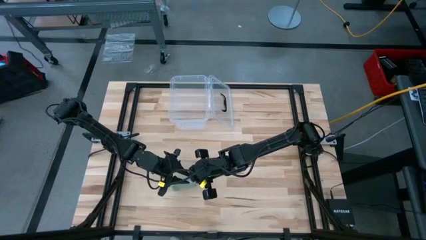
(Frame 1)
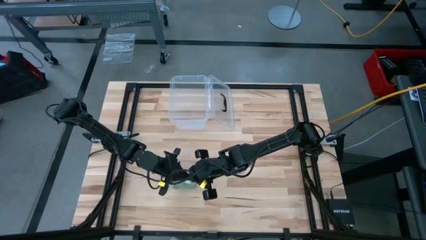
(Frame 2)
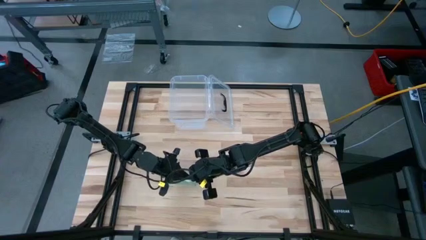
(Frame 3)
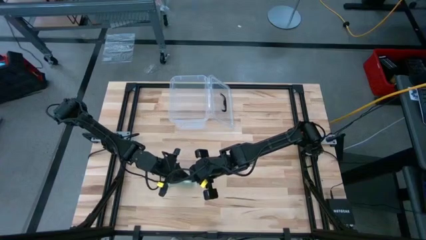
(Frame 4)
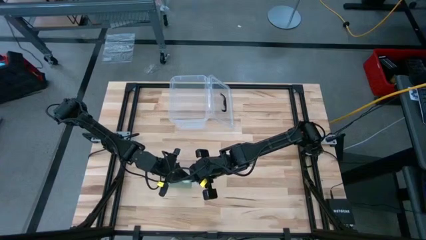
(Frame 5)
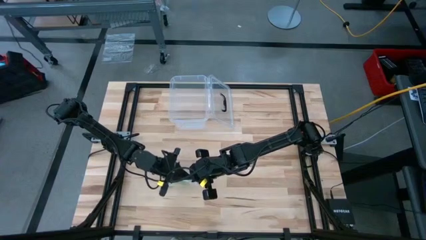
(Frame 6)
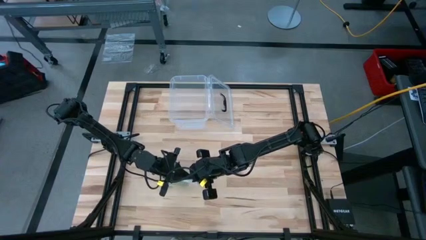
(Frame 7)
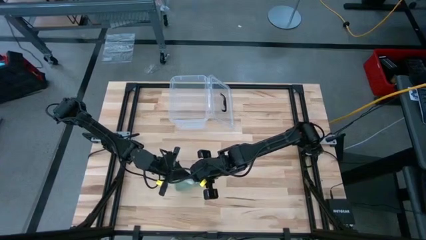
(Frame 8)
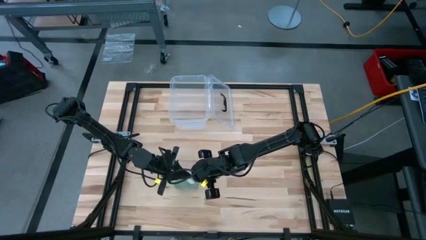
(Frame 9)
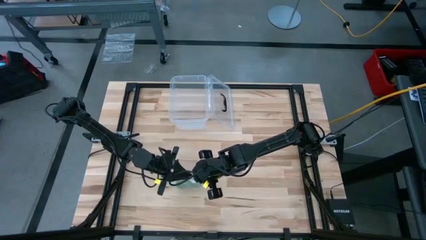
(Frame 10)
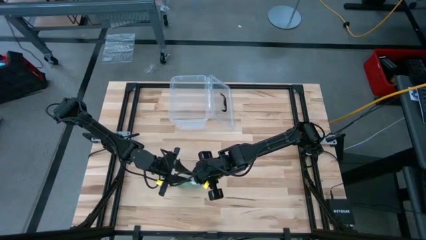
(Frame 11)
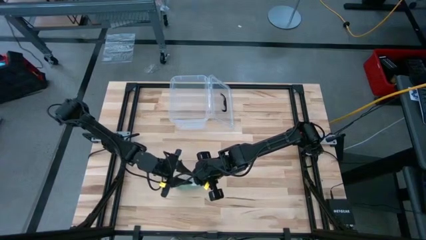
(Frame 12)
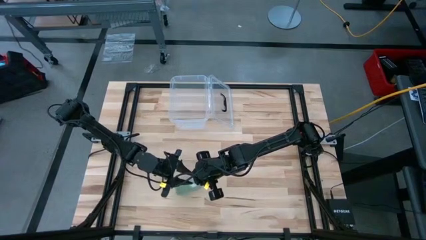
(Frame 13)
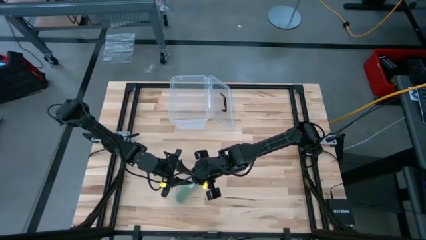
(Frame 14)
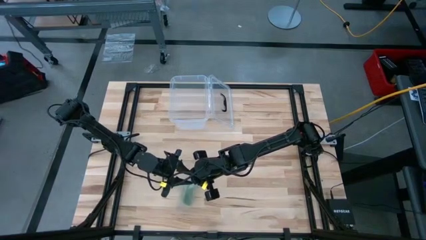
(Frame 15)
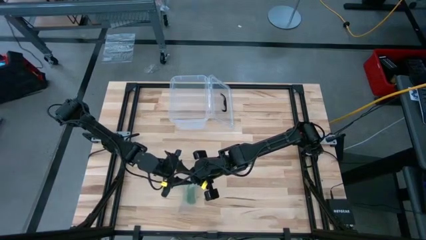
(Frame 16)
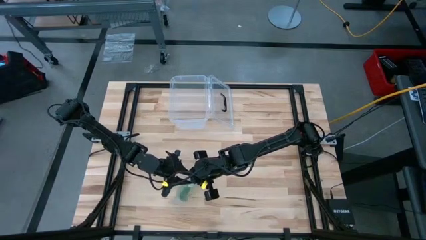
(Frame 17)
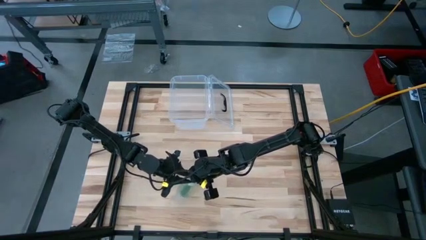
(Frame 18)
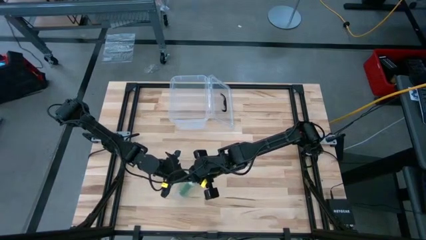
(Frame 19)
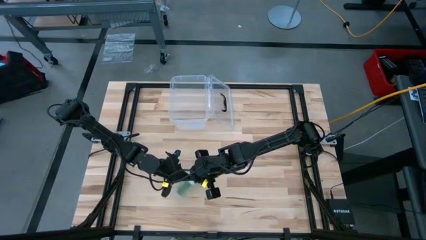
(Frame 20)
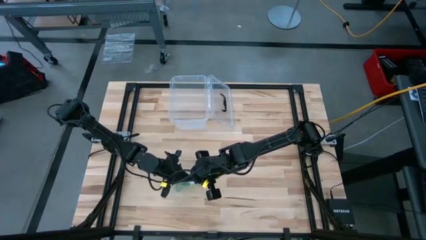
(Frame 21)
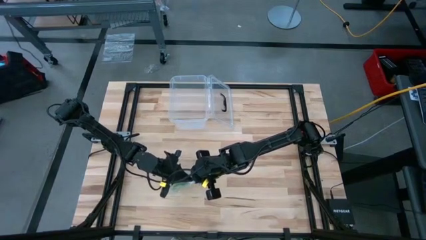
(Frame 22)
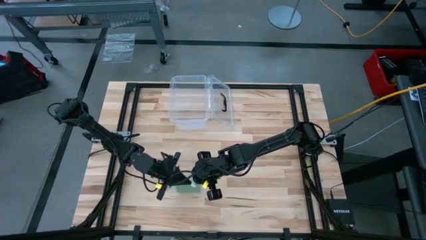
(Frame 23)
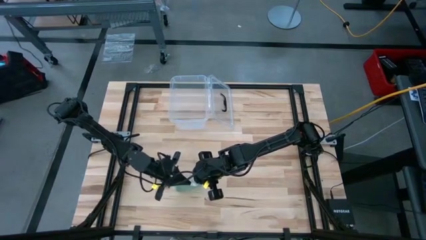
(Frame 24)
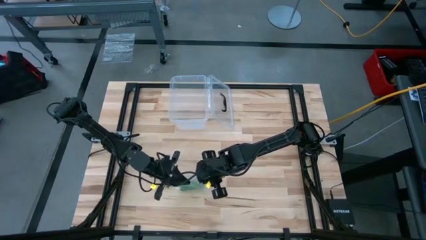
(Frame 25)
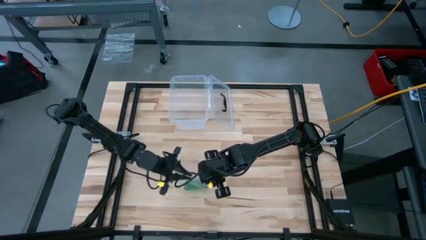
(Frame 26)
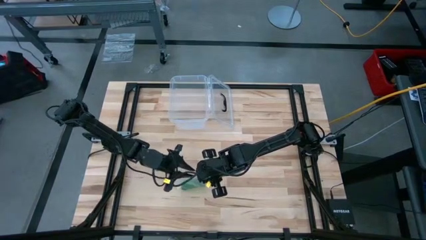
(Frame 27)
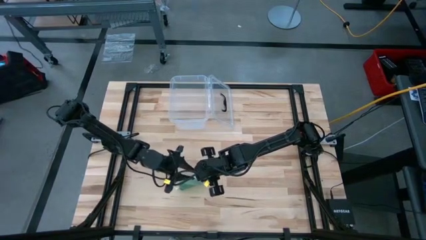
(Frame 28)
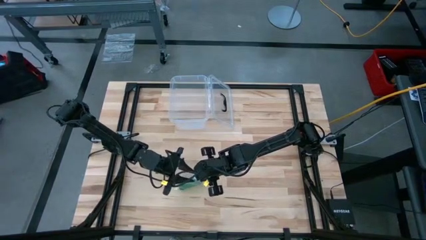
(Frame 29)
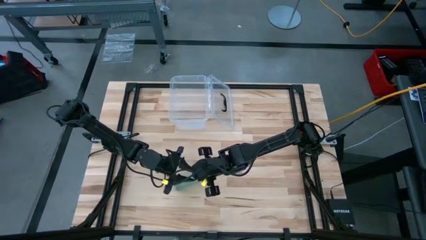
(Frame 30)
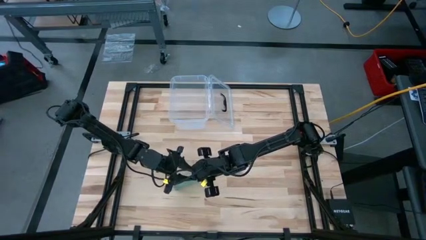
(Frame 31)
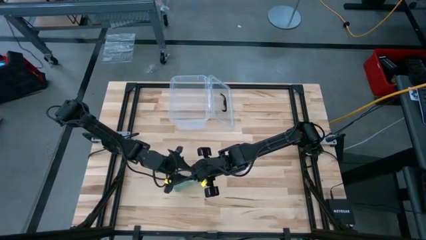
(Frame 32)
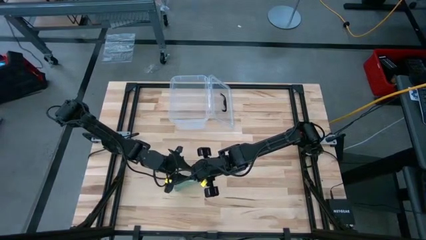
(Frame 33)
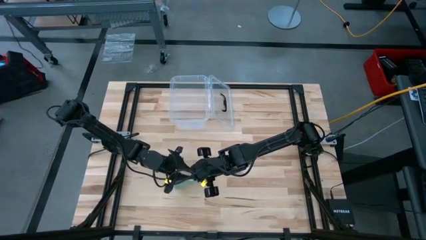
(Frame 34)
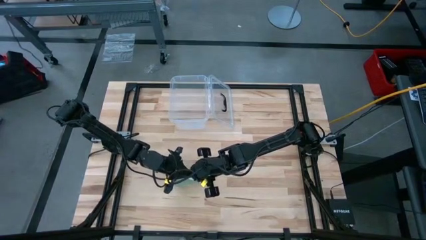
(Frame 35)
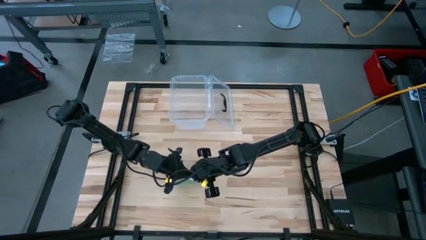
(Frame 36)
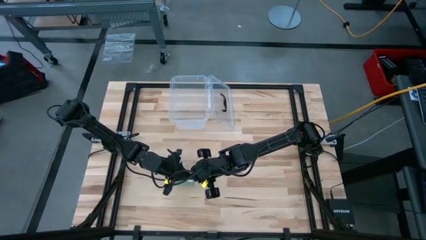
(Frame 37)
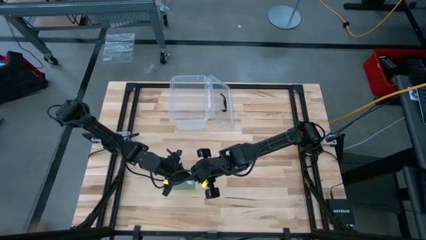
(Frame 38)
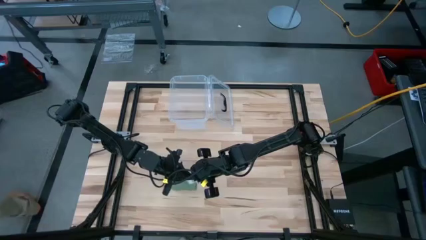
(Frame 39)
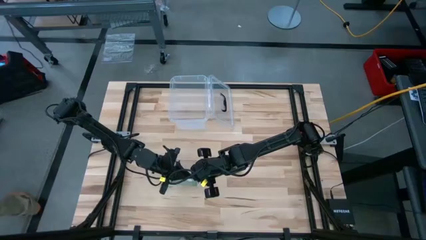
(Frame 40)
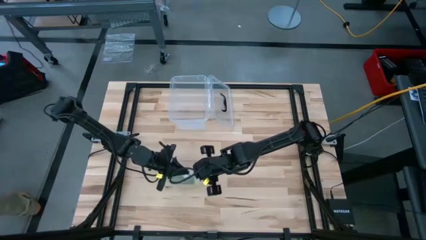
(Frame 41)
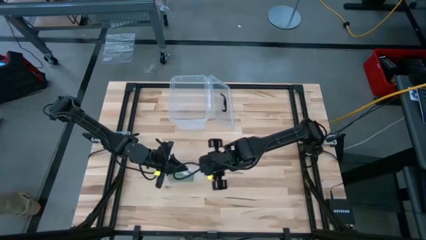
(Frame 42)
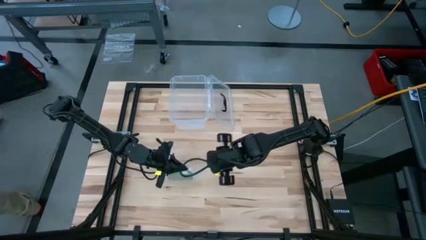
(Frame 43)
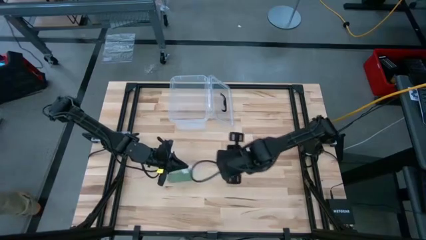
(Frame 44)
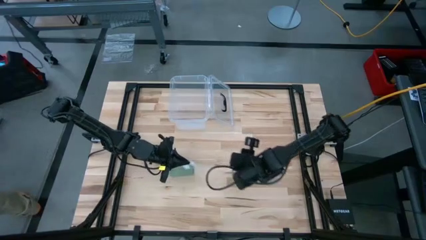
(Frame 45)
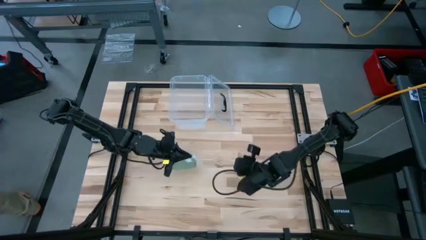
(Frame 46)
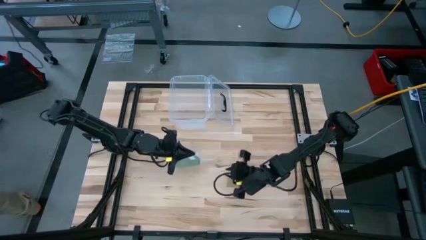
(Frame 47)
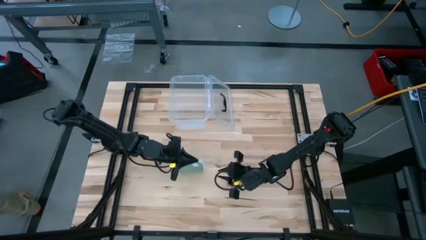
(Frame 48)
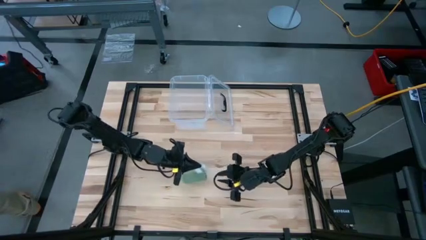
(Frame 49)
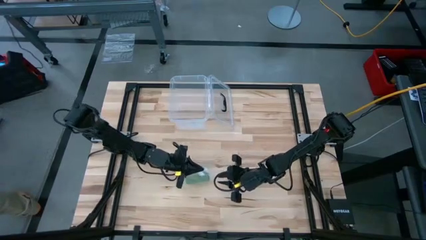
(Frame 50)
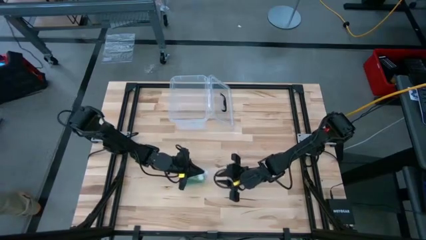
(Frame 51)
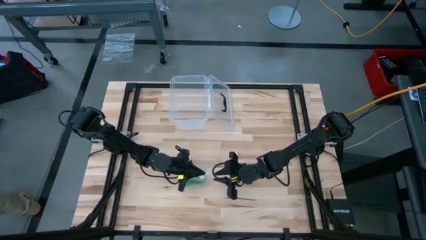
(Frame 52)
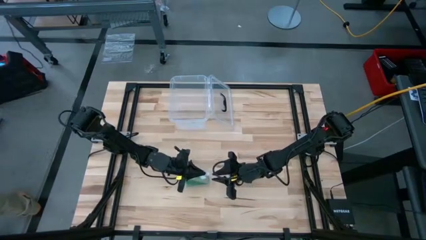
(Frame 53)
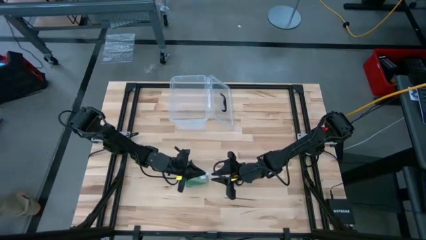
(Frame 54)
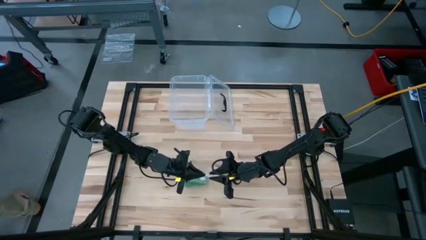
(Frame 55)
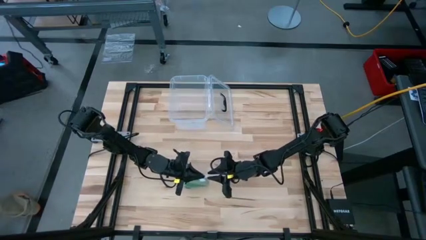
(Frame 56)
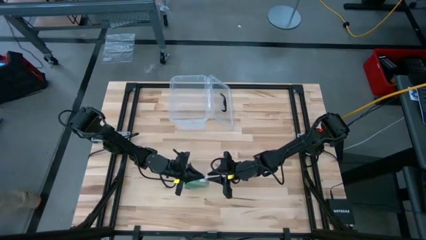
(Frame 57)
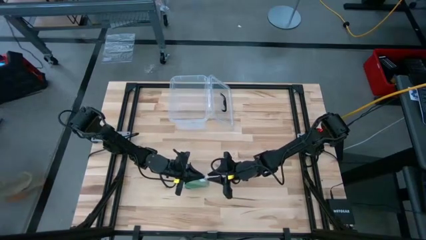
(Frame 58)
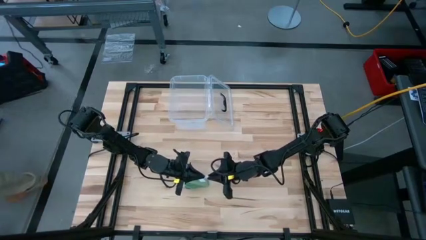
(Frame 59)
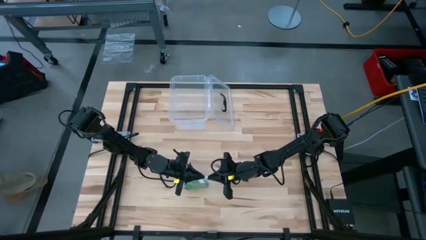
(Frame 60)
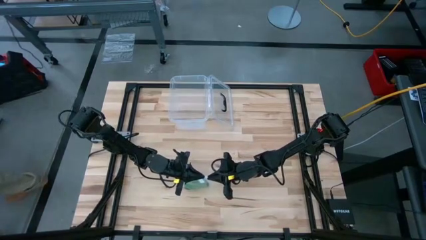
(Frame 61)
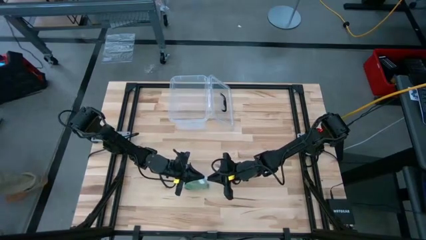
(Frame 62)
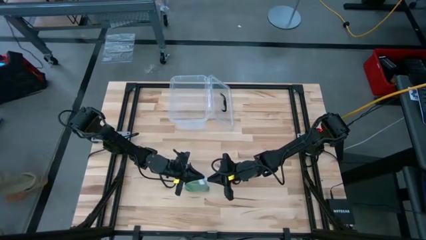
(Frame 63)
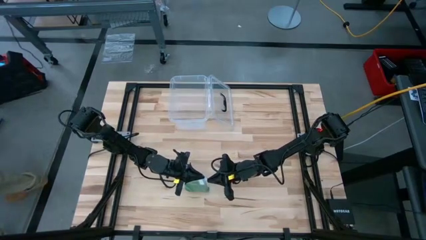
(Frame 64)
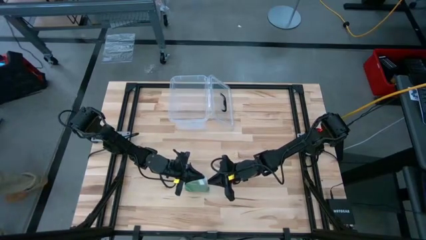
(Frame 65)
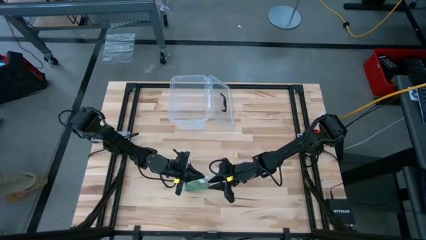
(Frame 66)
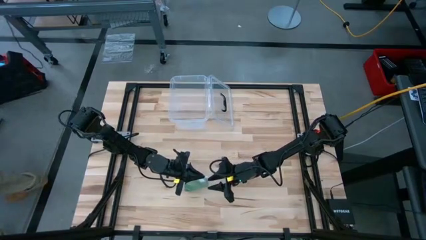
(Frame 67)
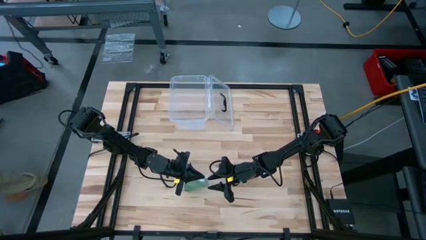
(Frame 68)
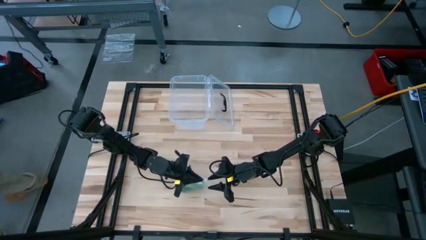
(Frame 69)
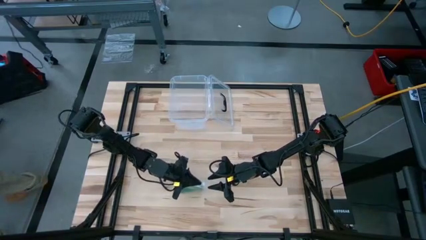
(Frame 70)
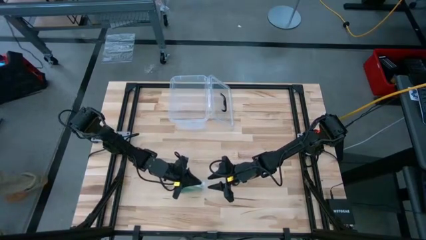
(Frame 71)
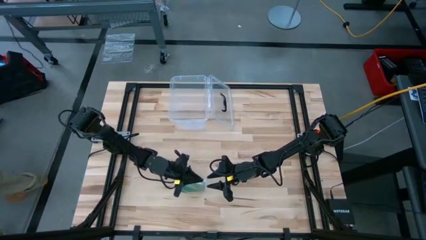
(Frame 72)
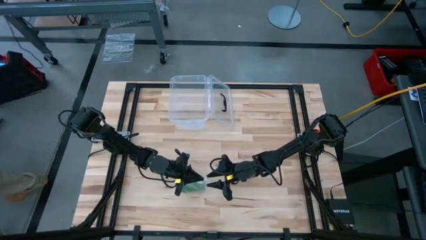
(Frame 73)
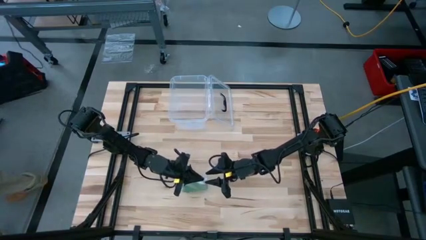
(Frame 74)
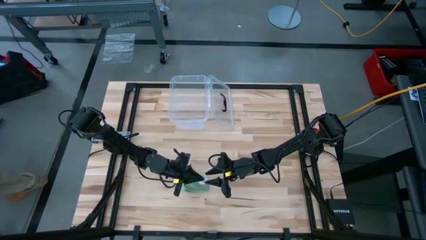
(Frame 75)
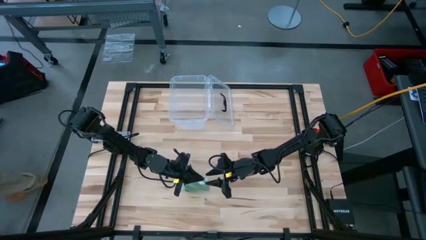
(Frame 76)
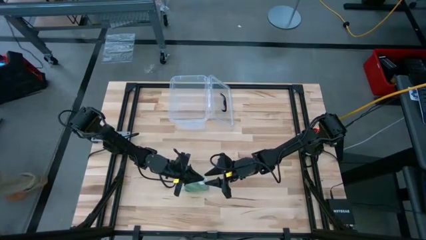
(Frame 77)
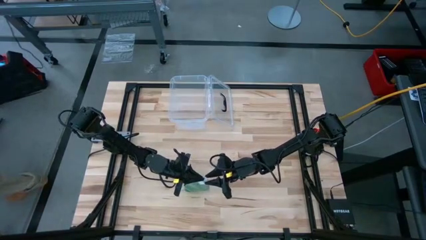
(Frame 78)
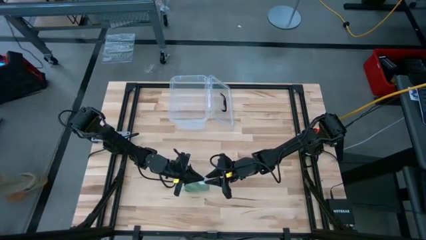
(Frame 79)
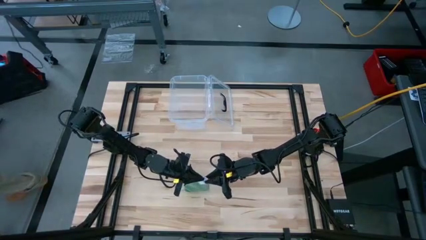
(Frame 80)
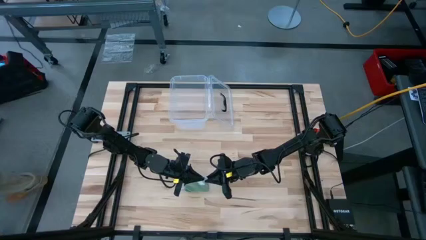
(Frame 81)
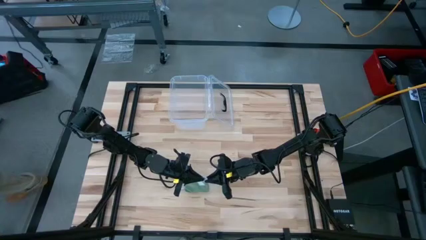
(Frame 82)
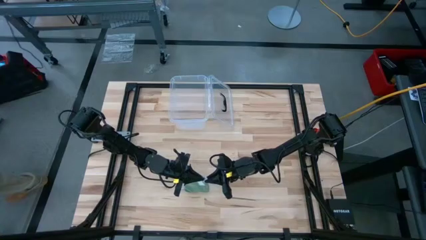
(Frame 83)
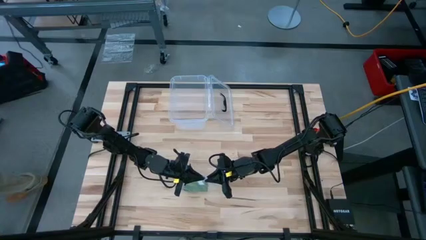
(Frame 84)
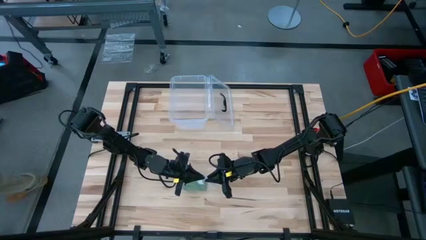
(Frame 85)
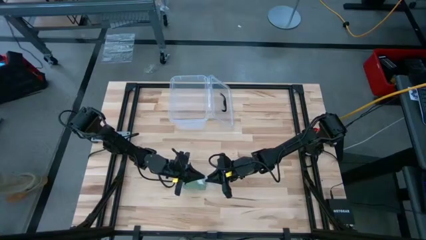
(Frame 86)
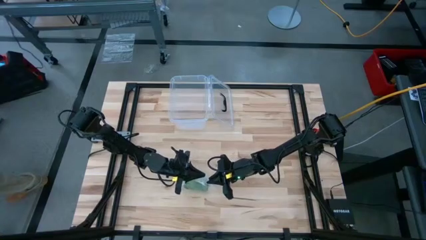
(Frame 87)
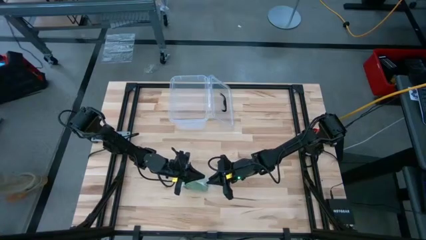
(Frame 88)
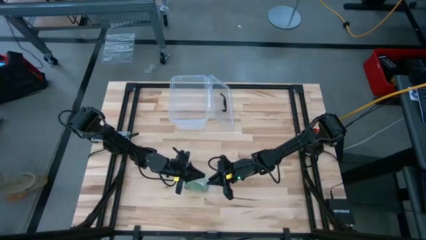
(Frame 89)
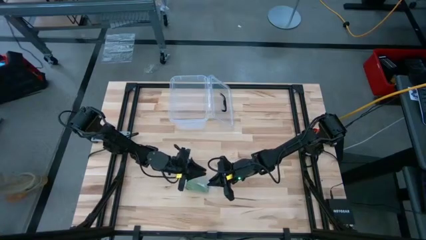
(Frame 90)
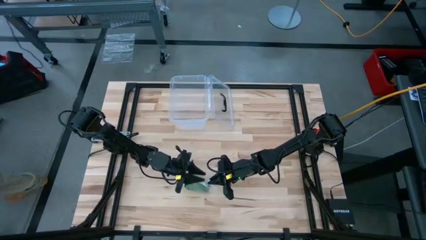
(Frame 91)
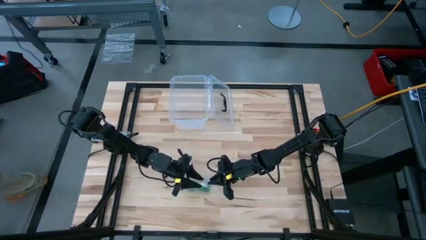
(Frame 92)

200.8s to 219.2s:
Task: Roll bandage
Close the transparent zip bag
